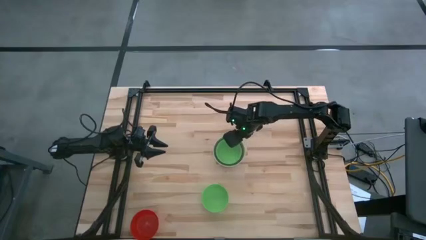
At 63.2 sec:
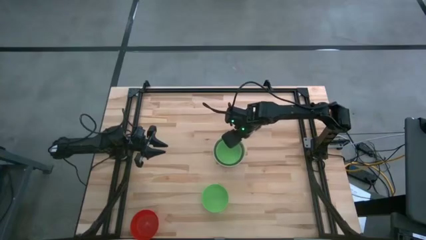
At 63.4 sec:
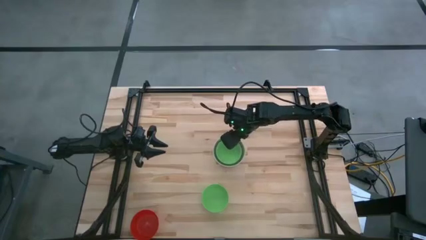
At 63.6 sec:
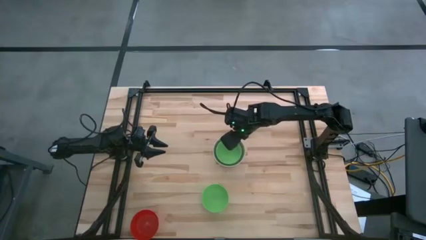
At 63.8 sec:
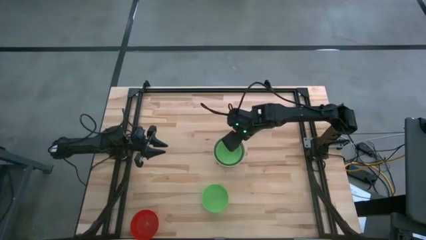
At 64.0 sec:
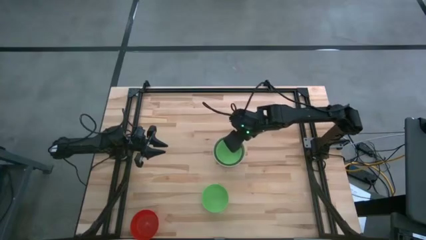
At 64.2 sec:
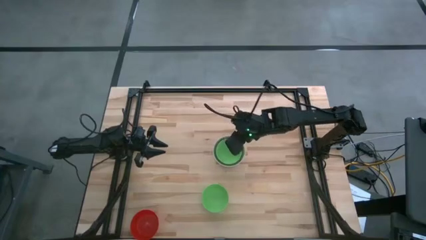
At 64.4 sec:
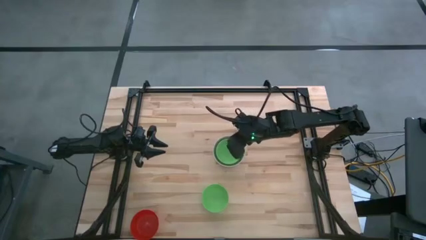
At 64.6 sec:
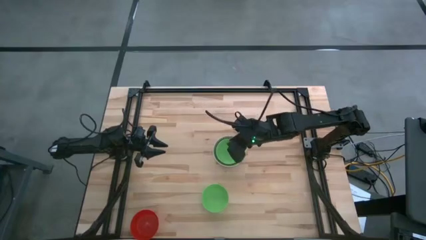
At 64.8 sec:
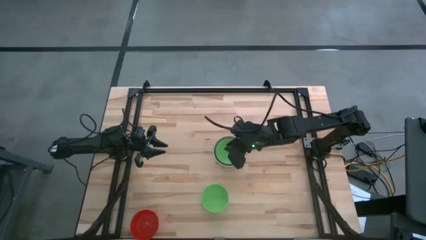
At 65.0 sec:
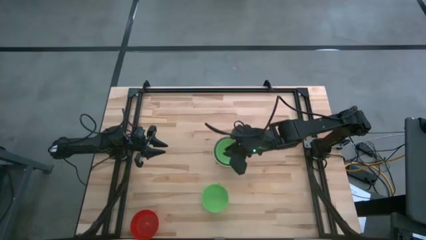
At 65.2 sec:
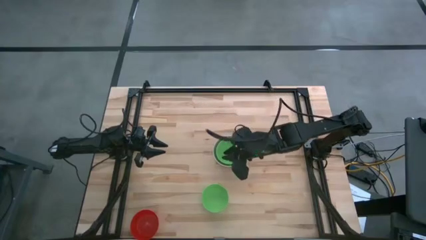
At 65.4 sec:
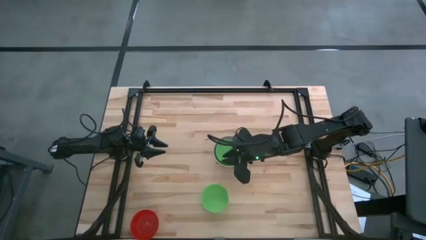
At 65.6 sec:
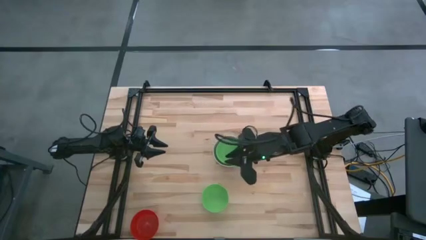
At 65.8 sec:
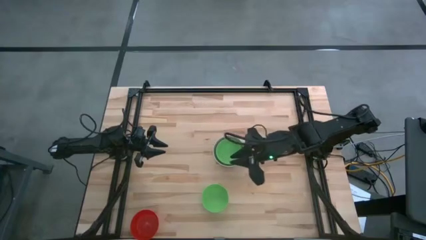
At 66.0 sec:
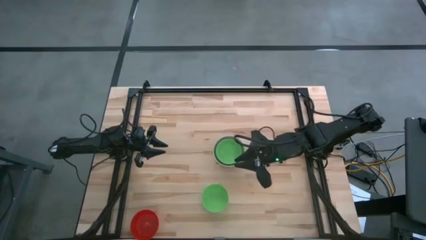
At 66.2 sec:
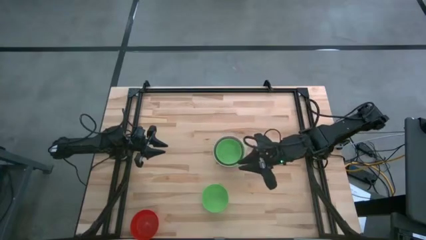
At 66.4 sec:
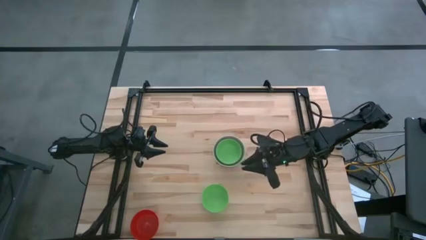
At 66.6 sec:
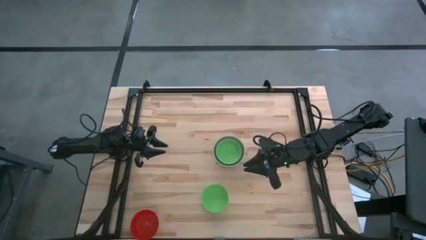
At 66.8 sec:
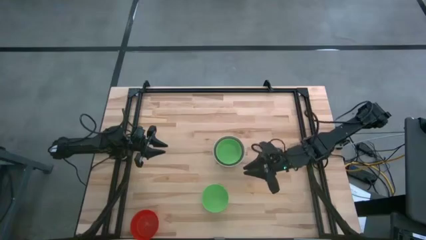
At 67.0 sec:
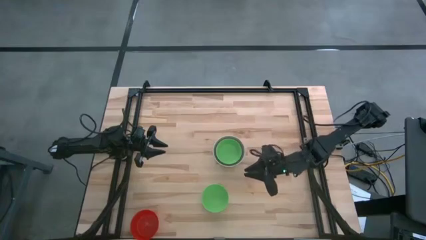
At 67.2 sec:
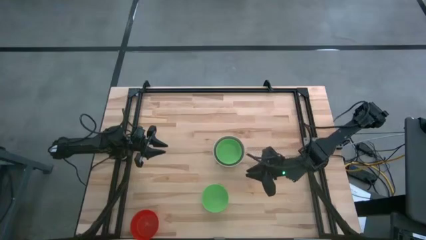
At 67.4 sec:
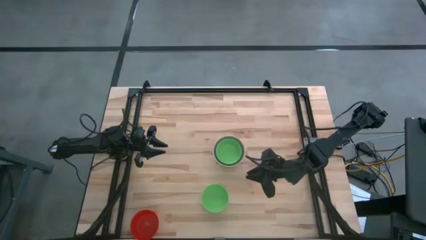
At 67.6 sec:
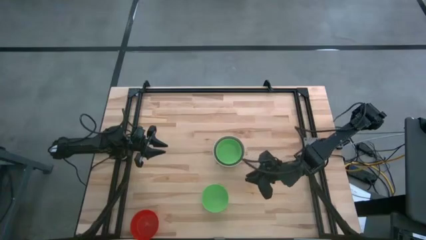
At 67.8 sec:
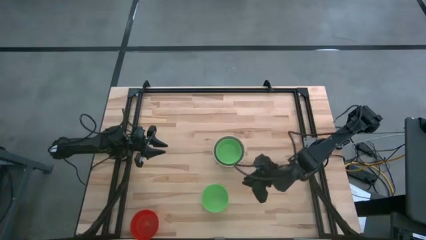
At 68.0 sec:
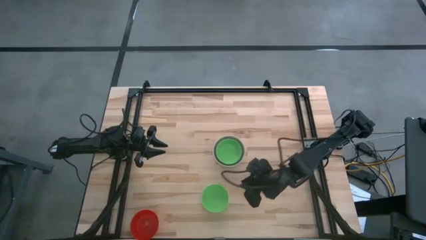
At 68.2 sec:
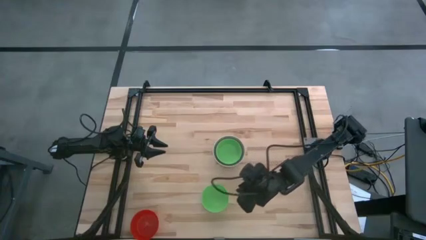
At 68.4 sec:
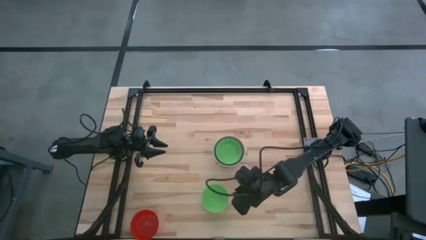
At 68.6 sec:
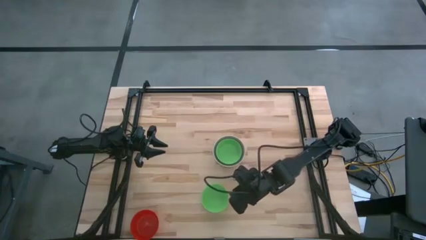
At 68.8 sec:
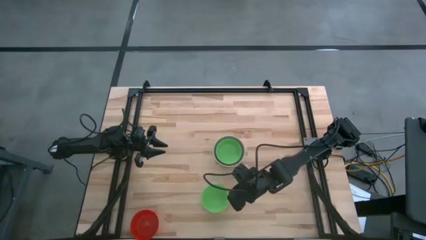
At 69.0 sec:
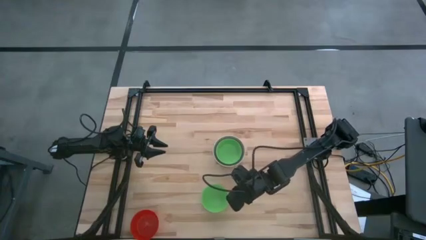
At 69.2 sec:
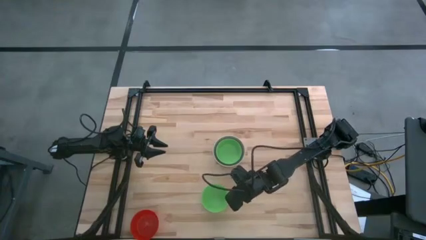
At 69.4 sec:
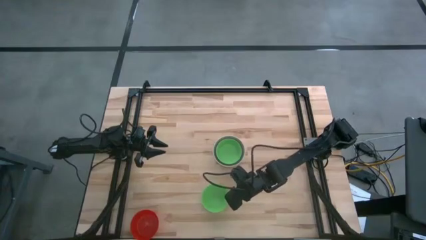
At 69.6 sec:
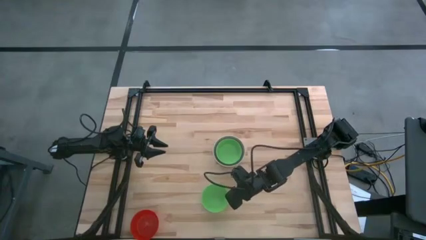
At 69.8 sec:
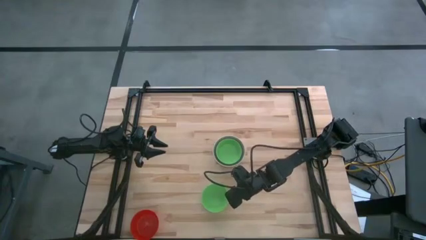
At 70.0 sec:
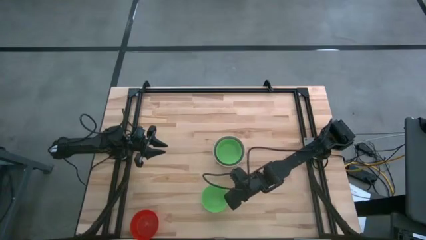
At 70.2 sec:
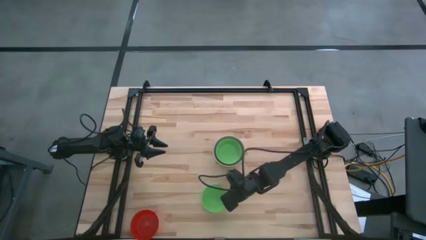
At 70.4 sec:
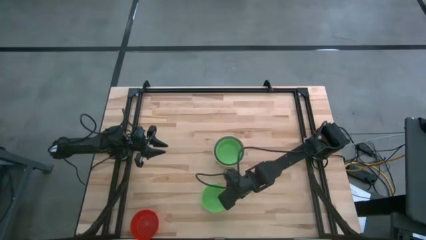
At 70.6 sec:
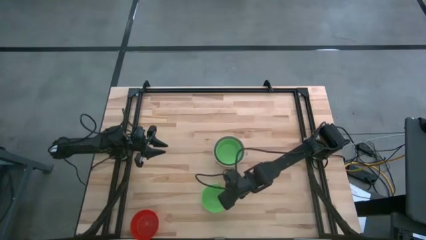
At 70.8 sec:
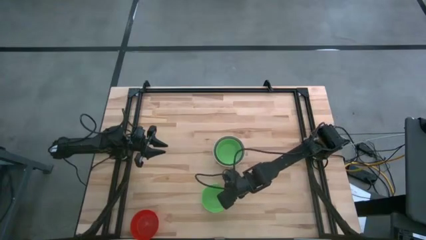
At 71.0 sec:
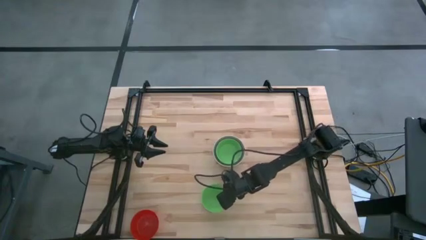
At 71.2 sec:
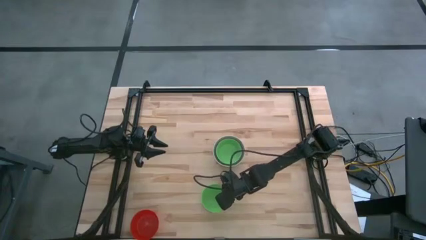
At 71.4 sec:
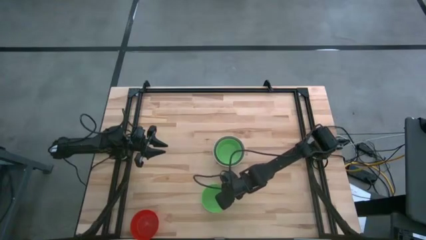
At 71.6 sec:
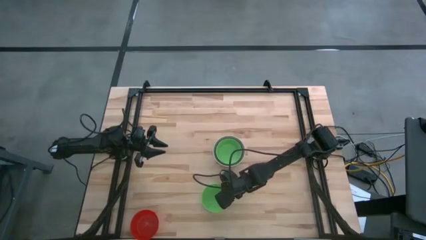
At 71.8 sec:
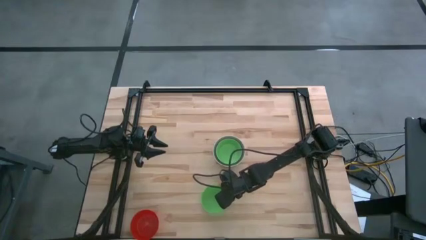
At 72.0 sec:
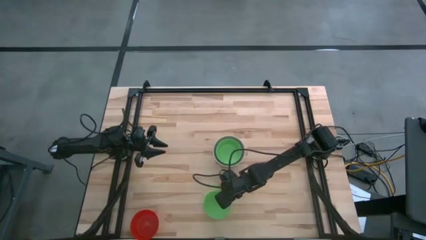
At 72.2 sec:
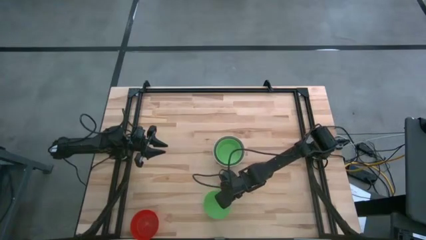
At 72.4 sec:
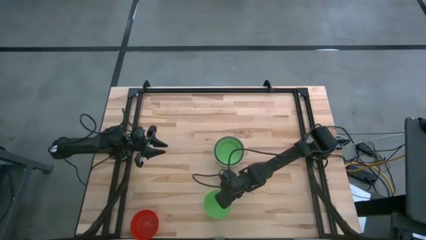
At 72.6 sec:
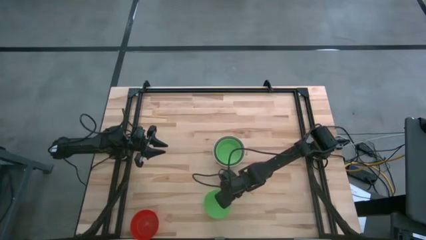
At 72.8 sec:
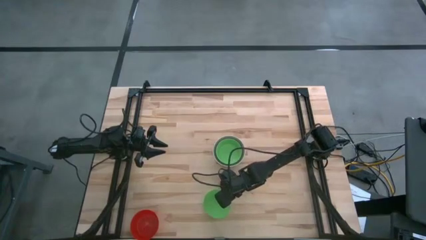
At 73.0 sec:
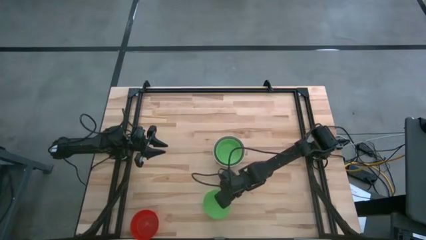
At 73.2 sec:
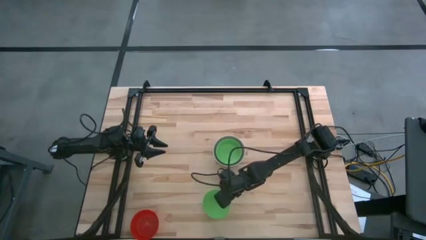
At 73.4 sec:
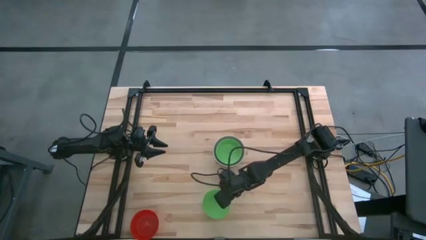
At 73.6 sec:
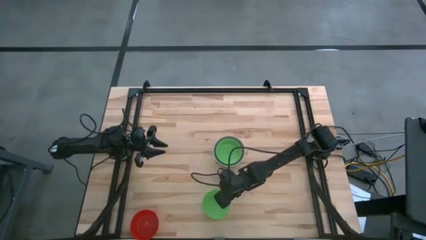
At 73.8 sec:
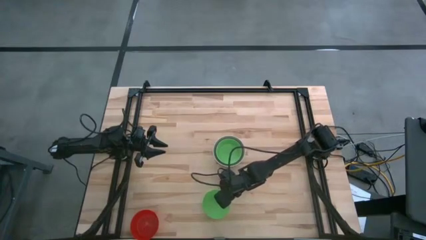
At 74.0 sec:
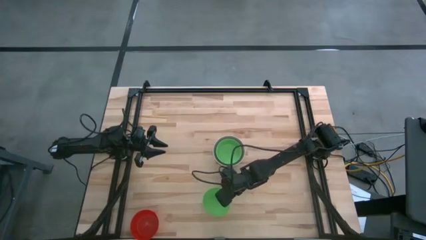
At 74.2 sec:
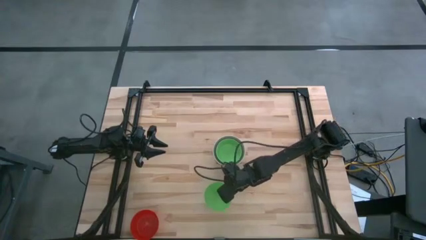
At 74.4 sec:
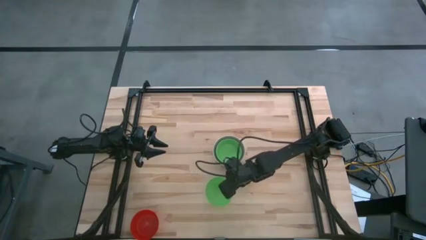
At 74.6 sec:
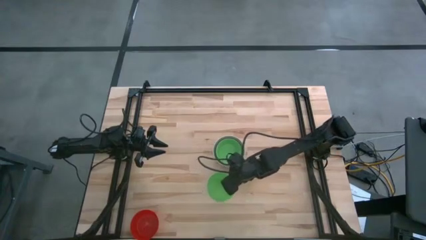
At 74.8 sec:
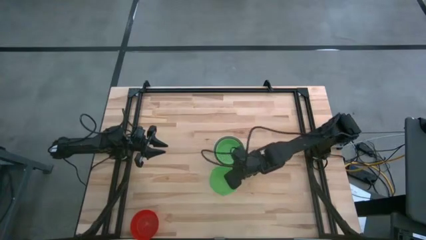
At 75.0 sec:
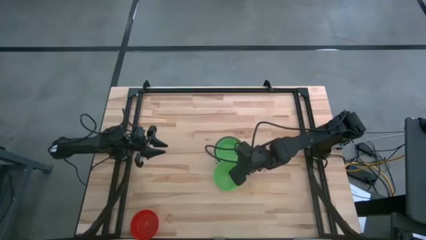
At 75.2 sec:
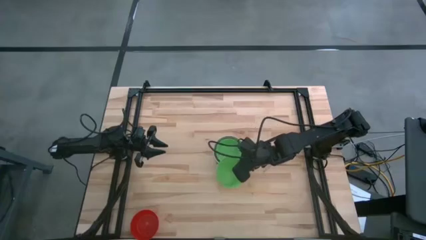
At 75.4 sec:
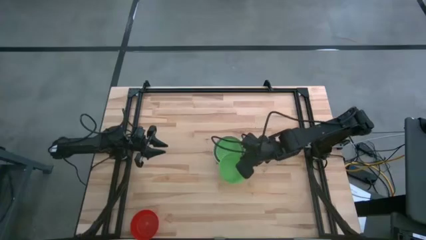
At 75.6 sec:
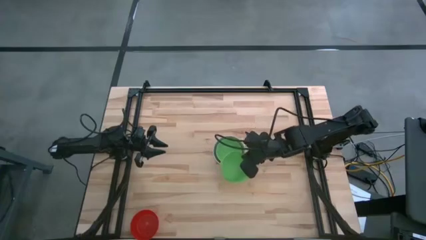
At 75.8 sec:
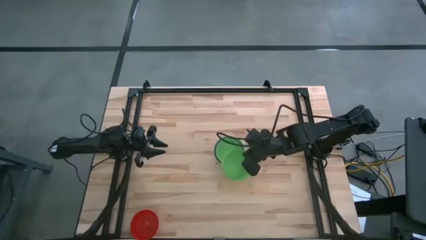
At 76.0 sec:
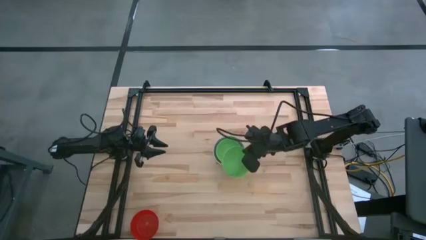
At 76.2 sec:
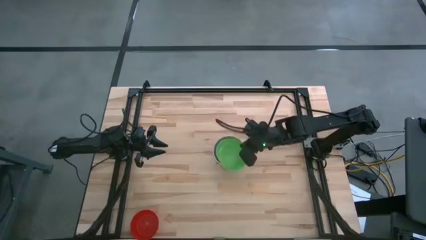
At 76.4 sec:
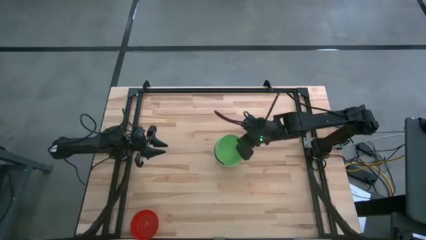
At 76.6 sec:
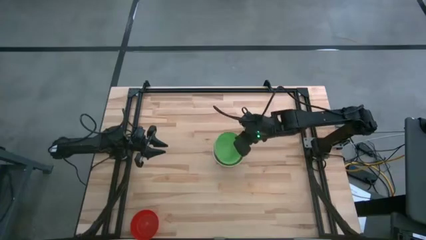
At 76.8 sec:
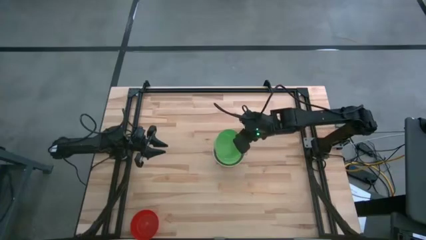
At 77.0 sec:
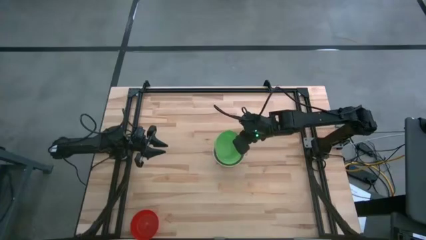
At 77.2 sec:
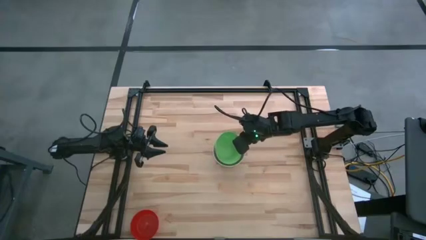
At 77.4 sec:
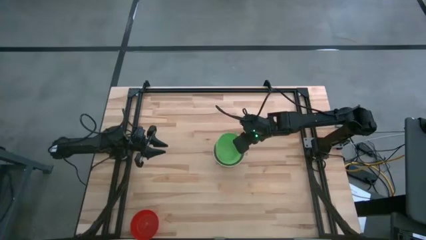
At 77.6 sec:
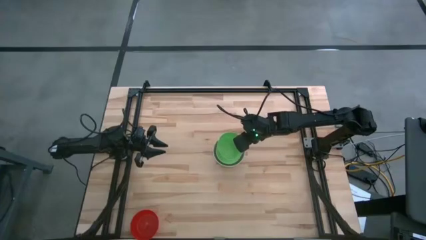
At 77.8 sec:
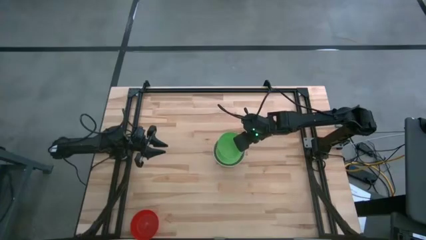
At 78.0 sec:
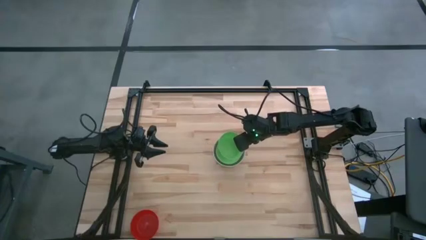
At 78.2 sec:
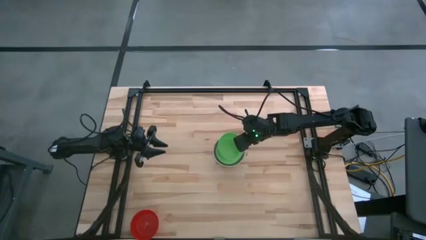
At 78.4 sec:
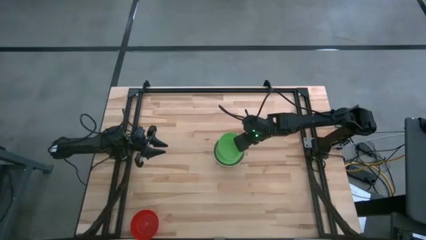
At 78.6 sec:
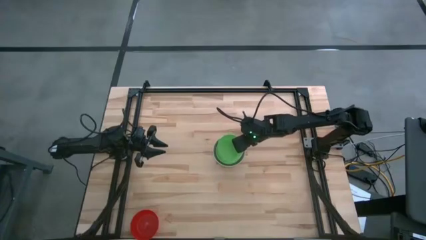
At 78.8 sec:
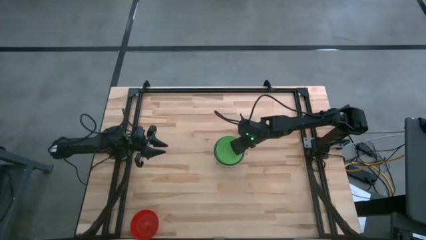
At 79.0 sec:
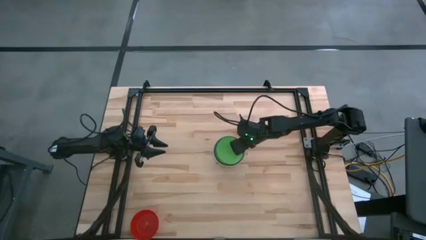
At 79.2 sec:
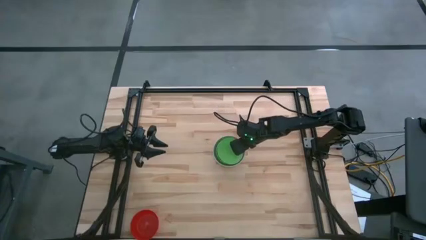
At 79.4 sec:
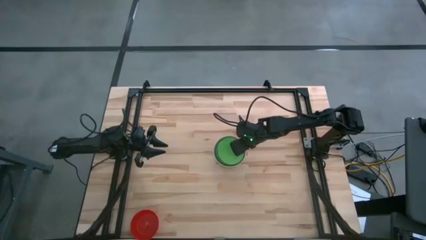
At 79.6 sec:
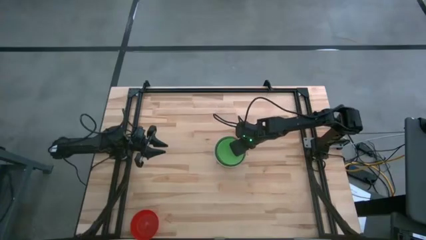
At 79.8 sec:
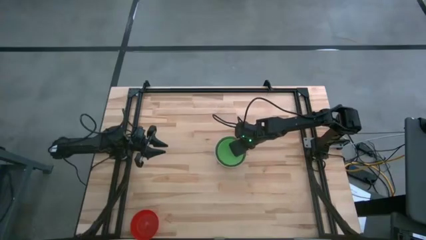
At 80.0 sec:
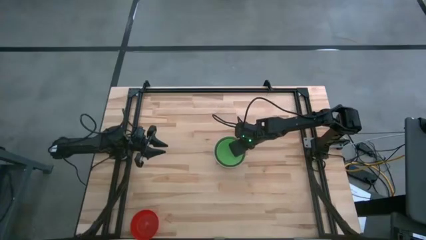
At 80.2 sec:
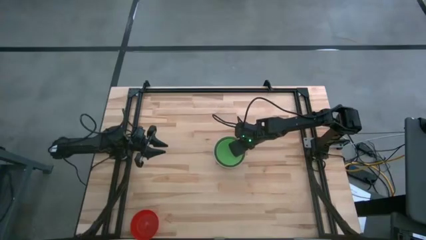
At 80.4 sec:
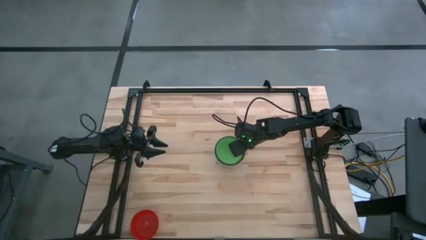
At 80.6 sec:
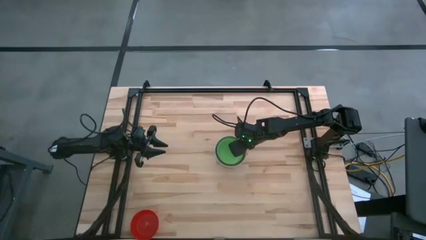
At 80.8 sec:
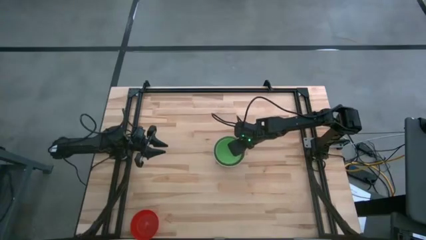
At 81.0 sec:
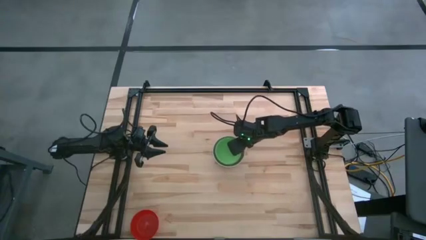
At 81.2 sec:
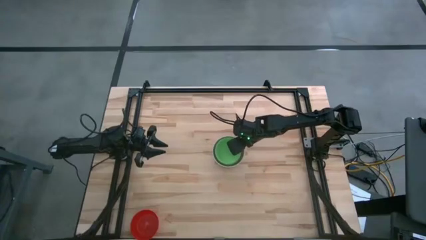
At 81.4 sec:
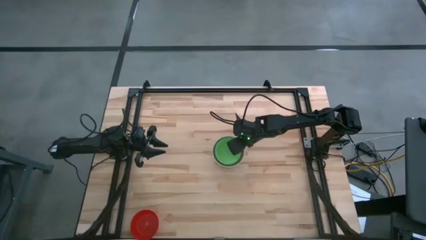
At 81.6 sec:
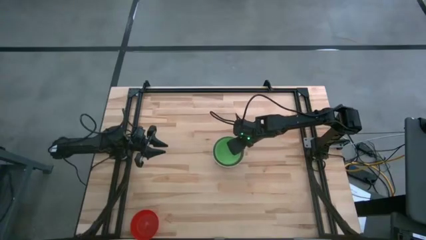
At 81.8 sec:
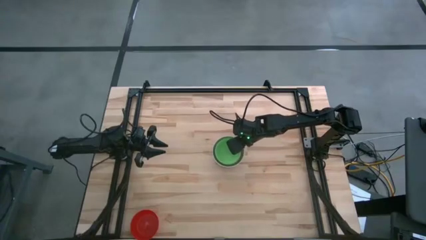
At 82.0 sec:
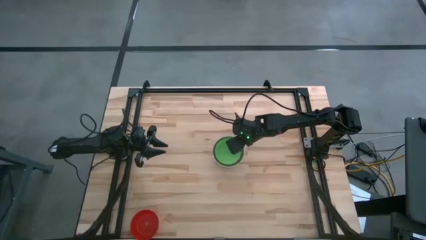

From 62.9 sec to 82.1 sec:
Stack the green bowl on top of the other green bowl
